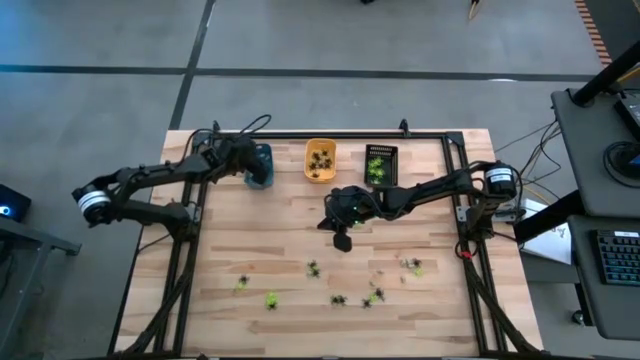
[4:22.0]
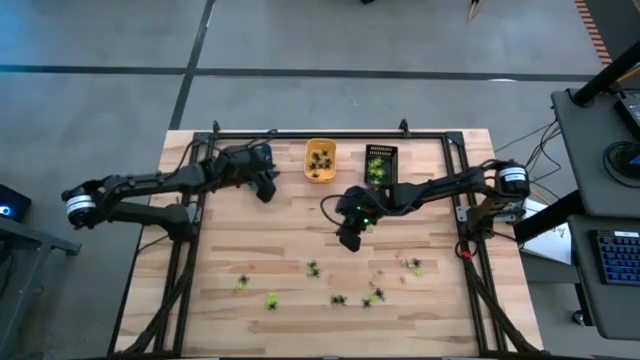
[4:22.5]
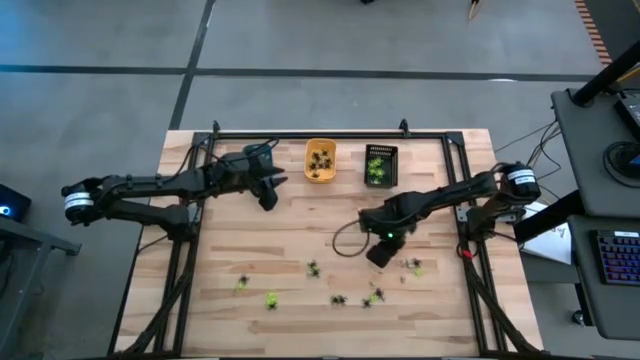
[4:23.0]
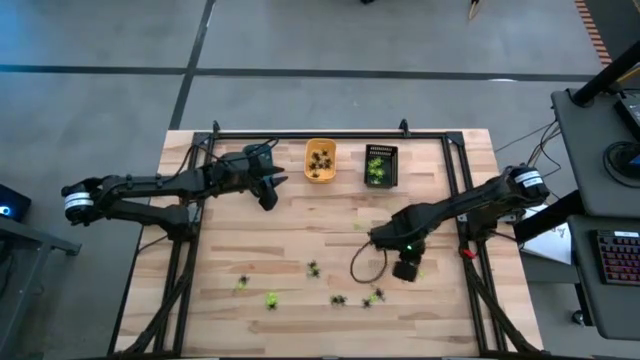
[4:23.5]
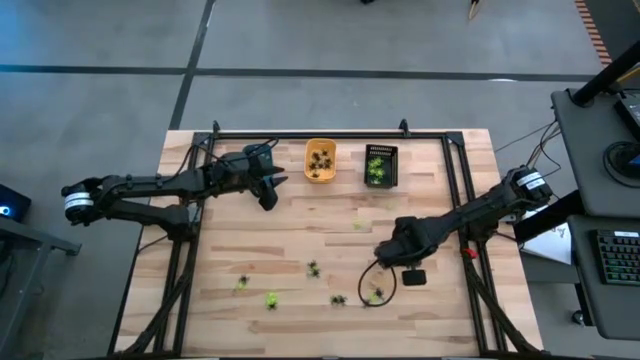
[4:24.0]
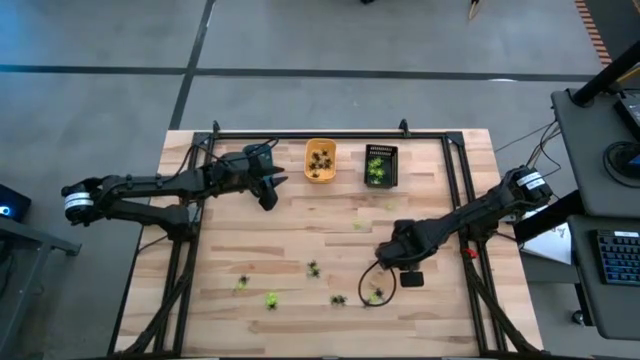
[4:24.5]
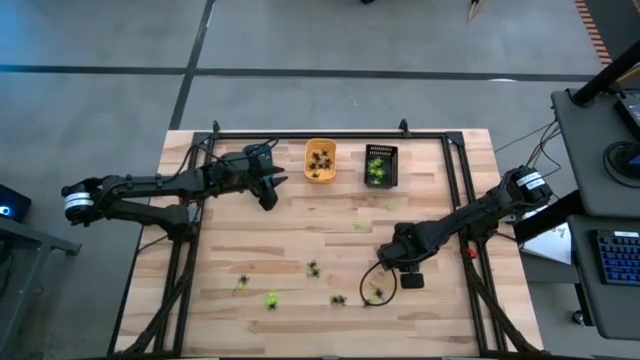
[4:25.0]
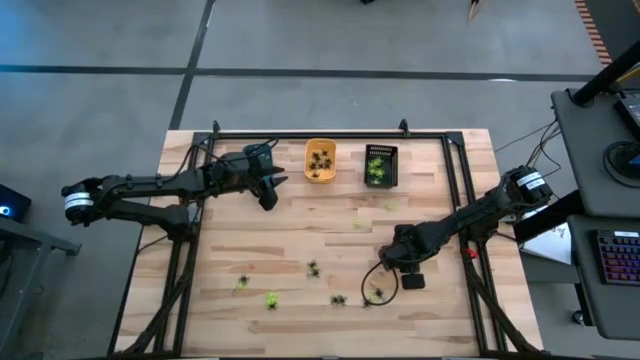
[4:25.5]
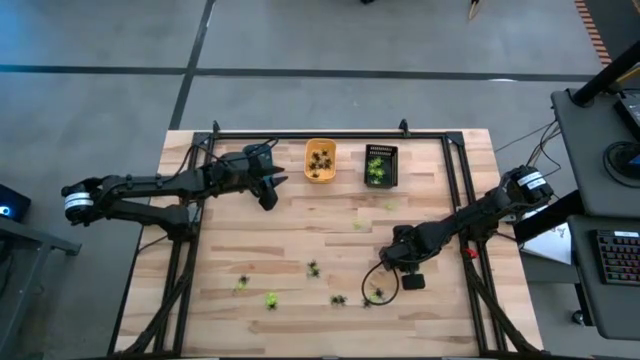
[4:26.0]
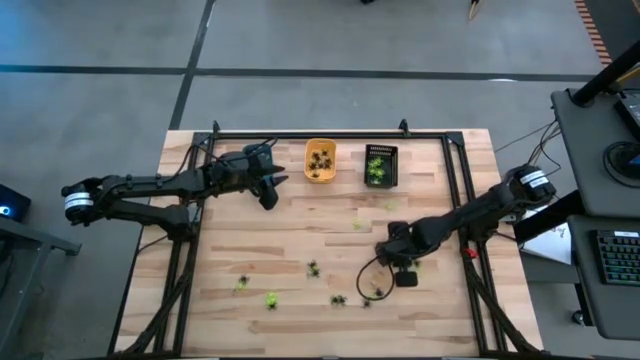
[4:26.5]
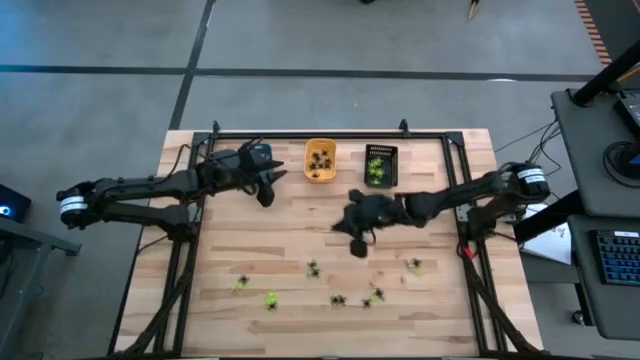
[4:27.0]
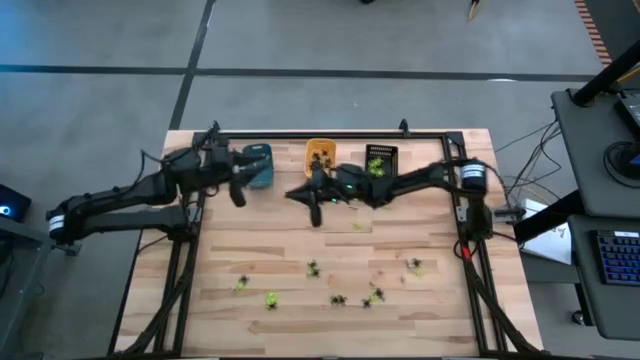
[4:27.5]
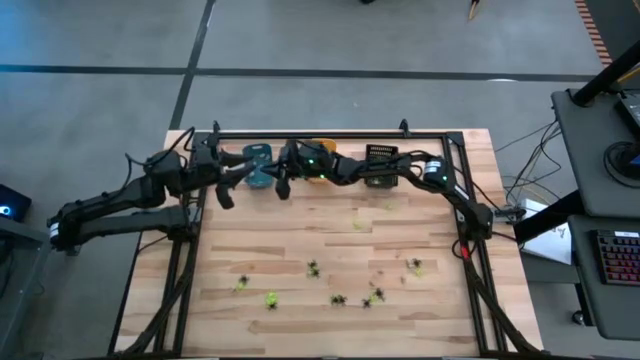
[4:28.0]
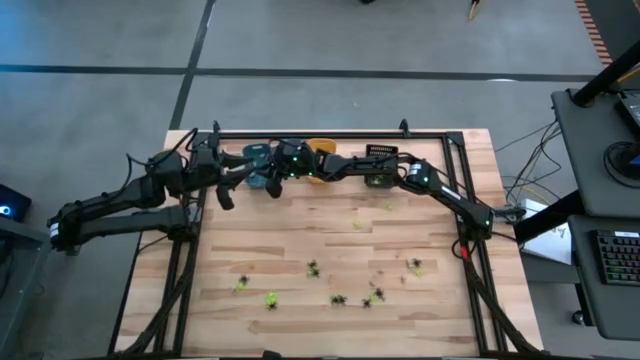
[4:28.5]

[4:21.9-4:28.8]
Task: Sort Halloween decoration
Put the white skull toy into the blue bin

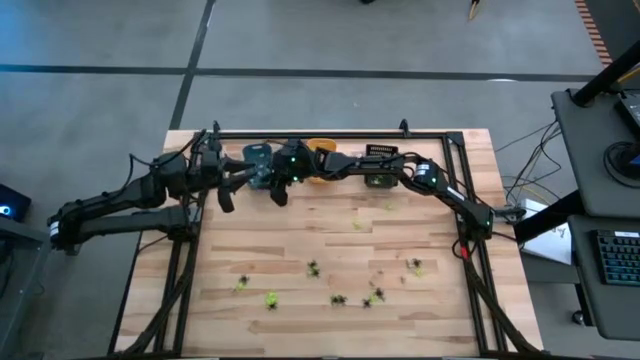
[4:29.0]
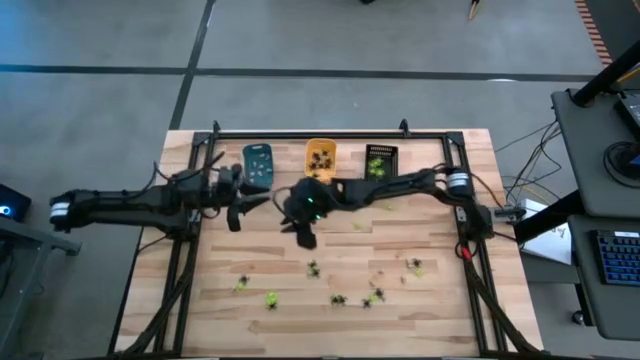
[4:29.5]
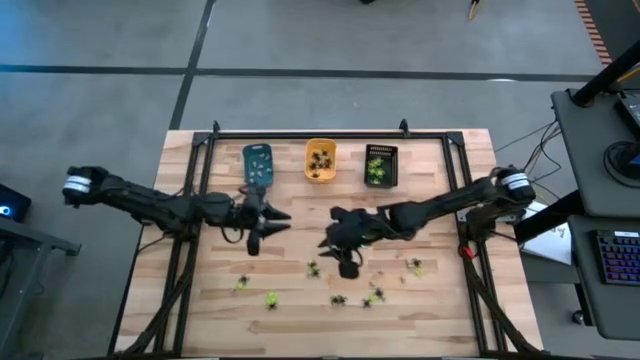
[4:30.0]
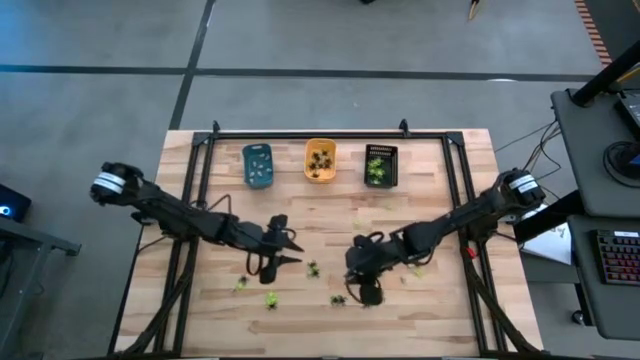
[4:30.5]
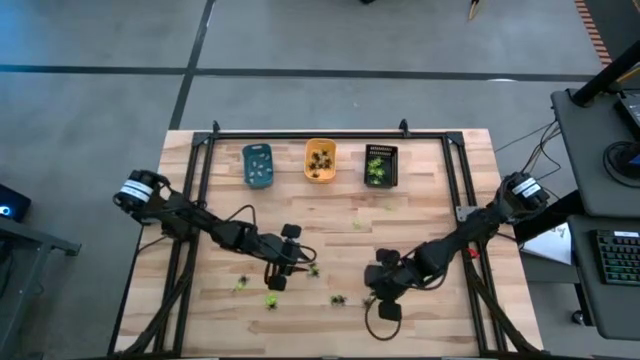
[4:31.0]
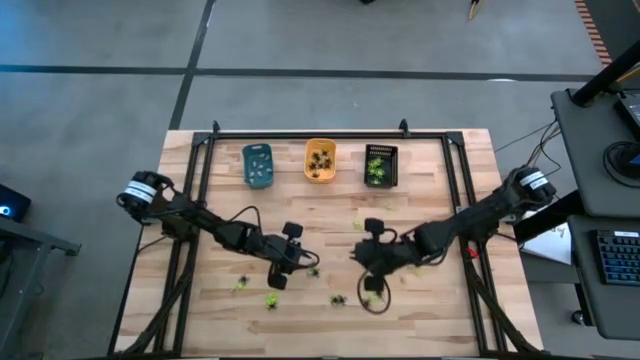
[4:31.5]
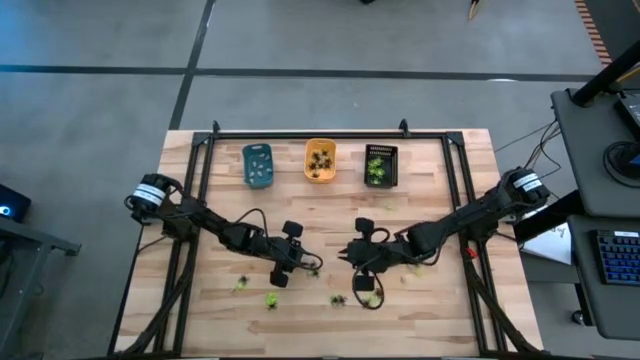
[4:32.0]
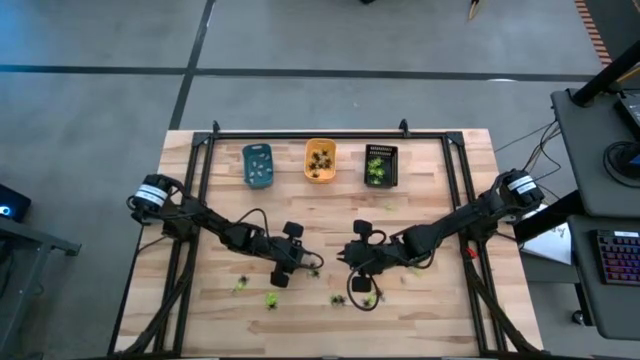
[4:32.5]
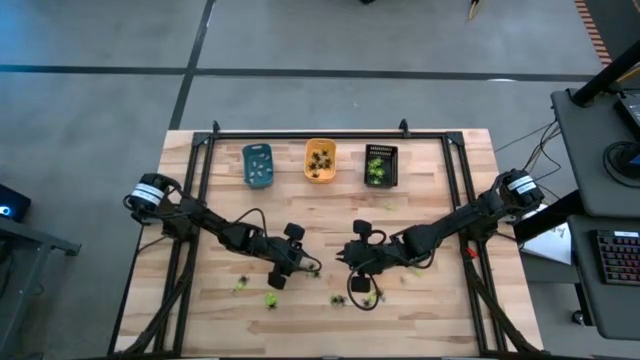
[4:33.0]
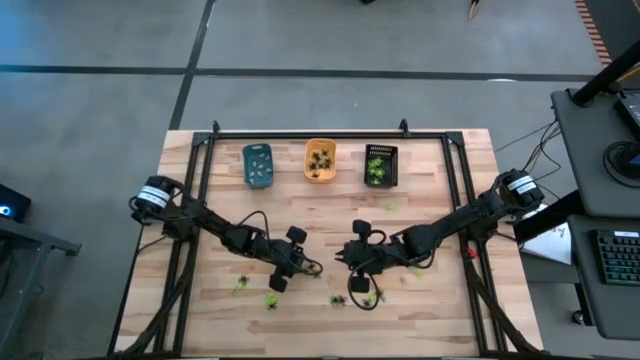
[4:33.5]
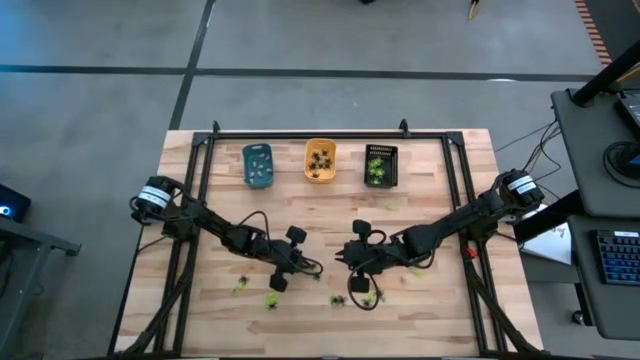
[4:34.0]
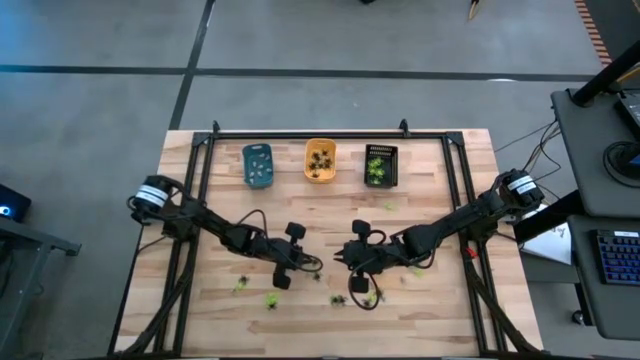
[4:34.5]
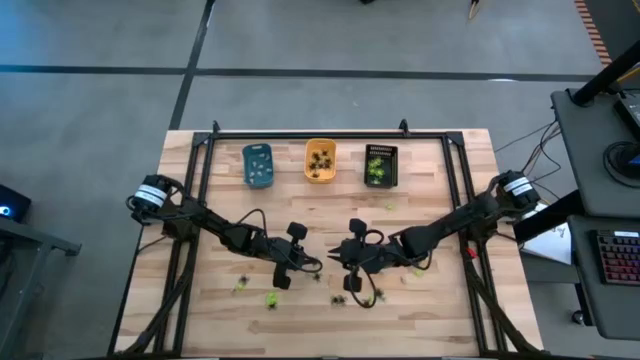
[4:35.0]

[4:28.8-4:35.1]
Put the black spider into the orange bin

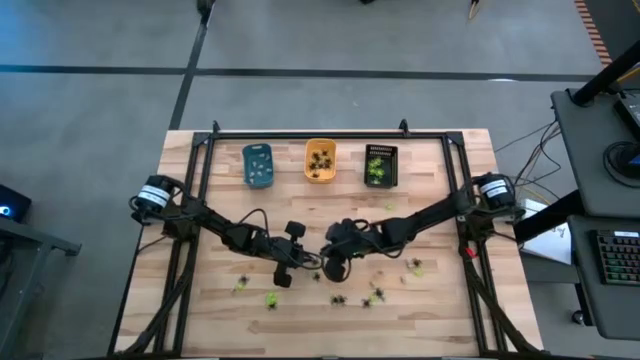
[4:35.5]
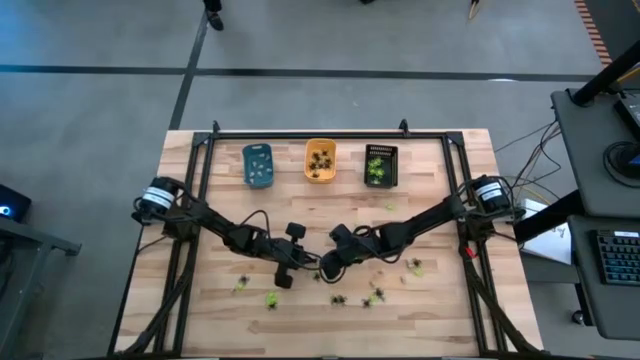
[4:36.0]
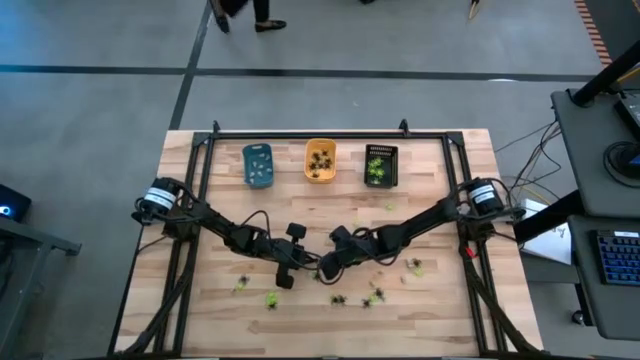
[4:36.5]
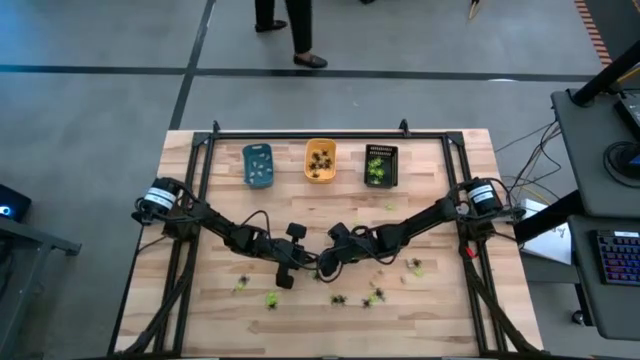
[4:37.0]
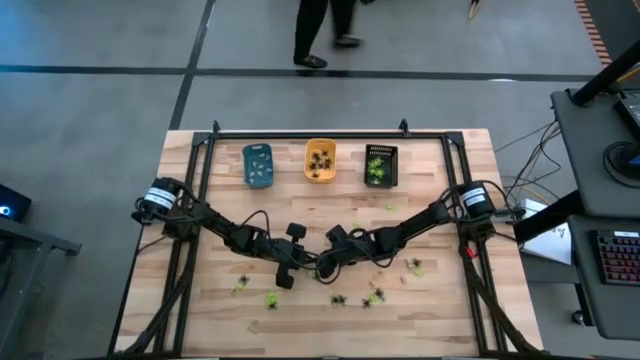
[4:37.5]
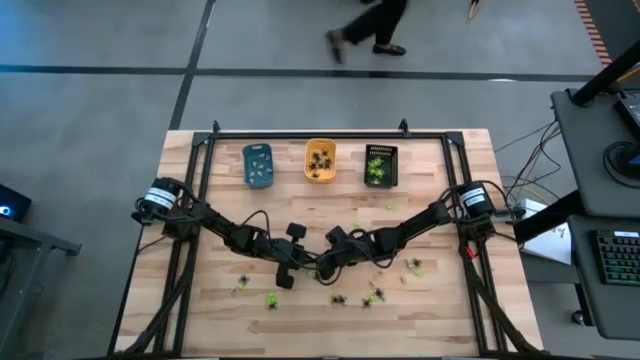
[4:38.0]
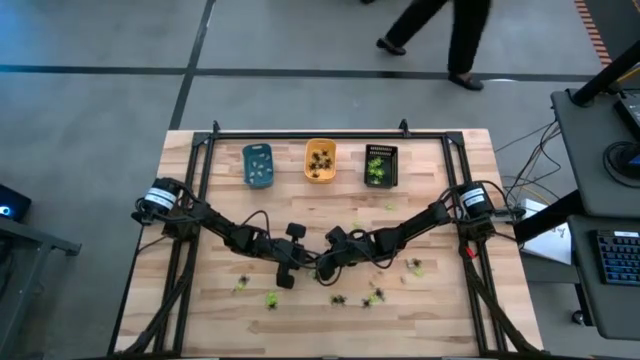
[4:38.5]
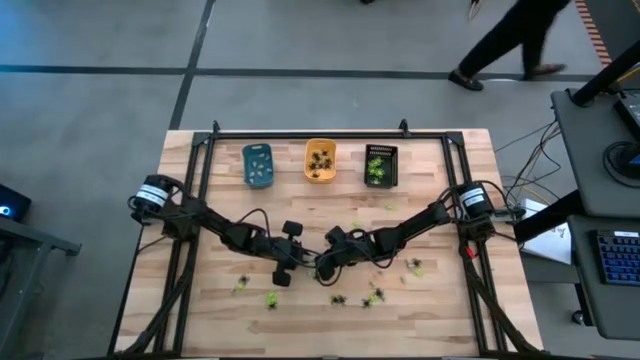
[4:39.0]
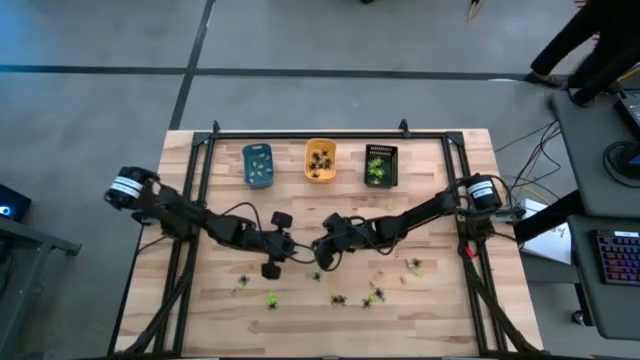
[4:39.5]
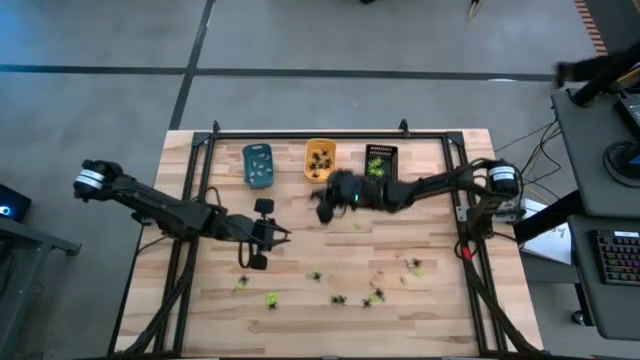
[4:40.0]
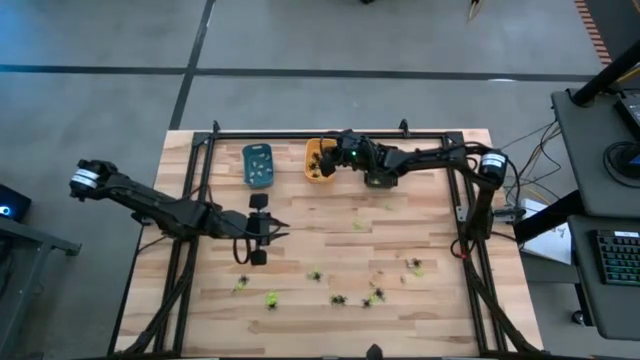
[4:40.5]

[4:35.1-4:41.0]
Put the black spider into the orange bin

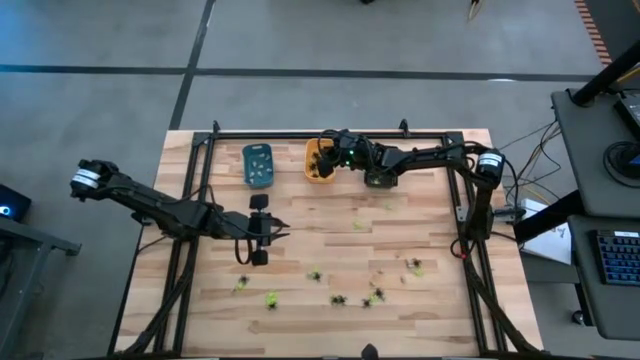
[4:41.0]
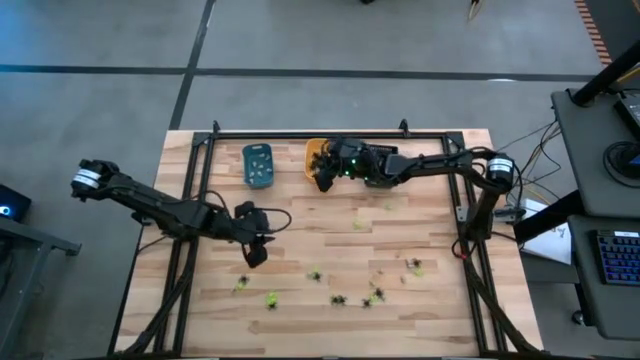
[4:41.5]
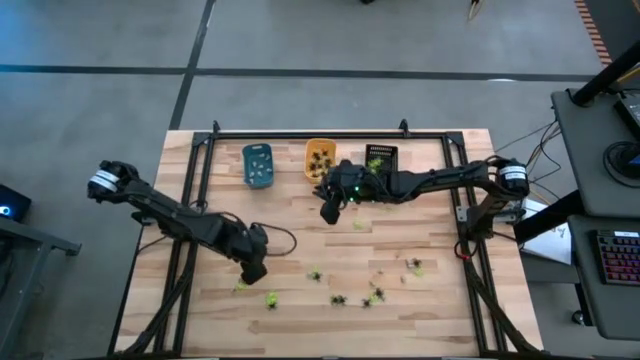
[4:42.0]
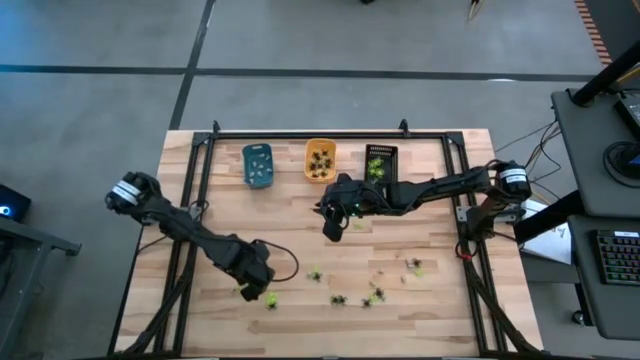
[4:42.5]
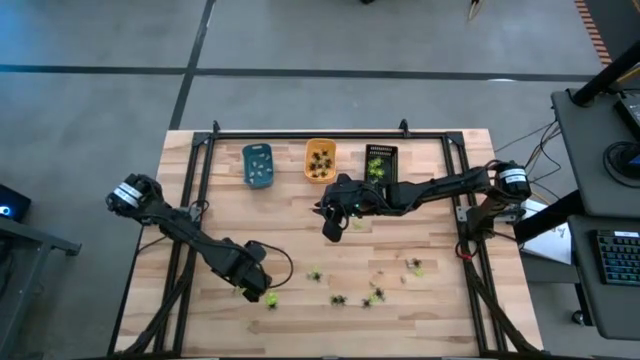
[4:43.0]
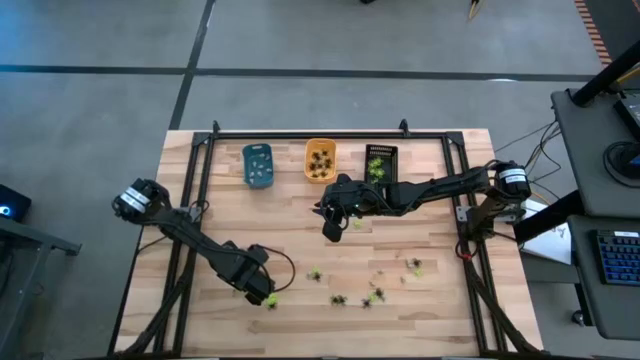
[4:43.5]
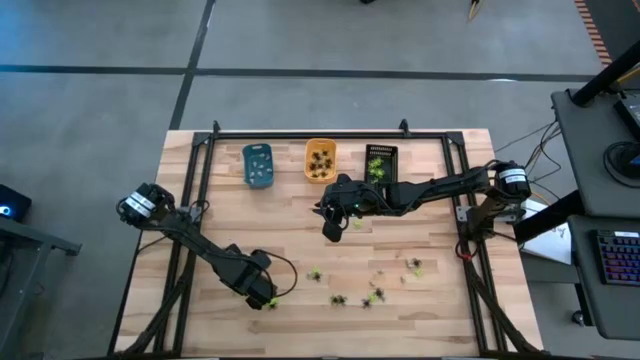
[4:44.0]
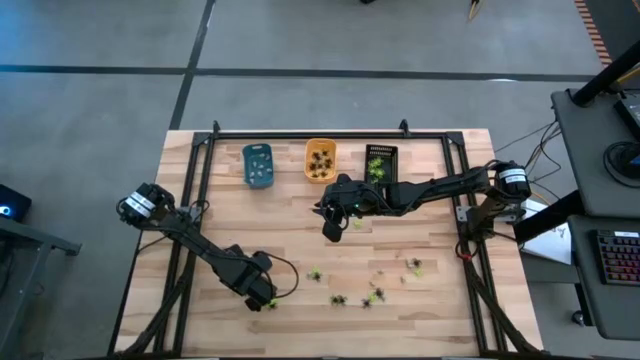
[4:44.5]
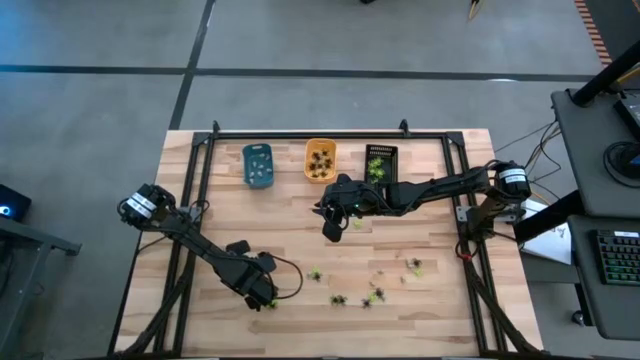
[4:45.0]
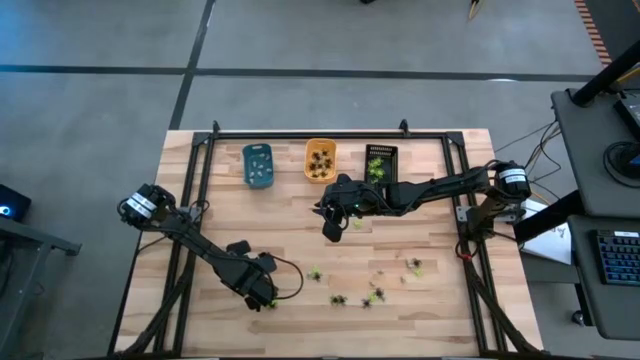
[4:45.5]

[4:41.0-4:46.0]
Put the black spider into the orange bin
